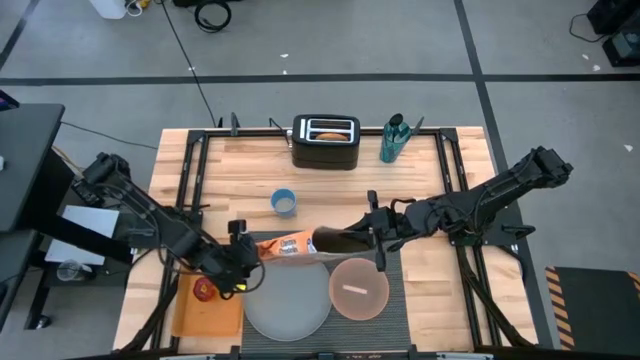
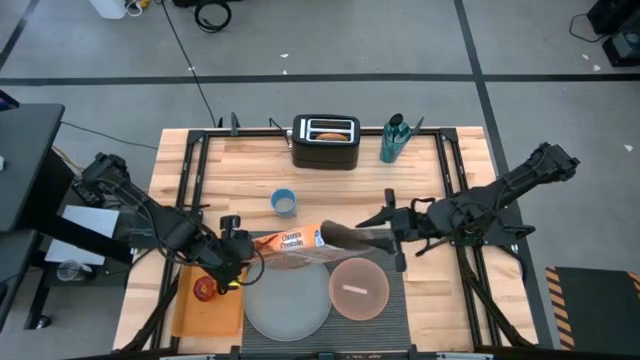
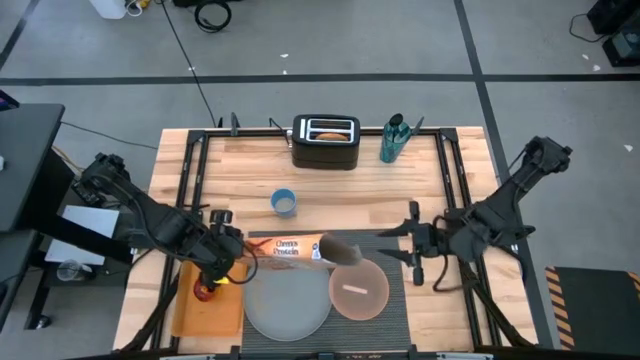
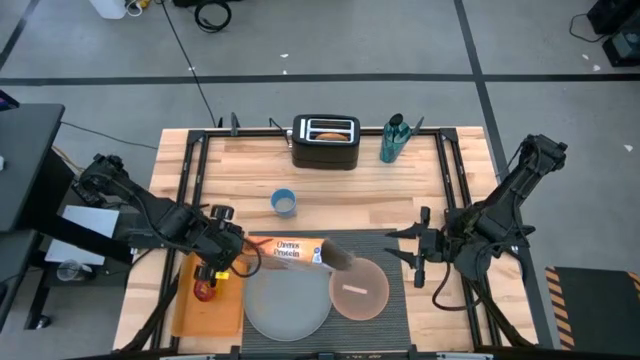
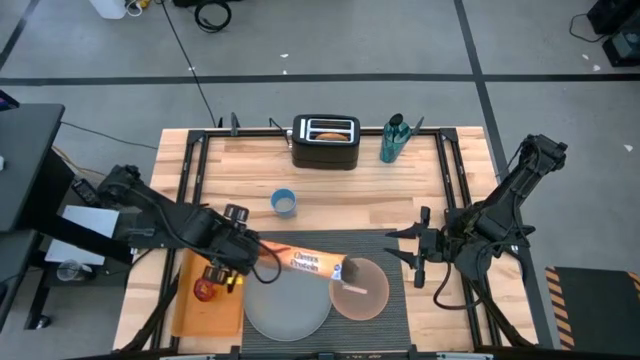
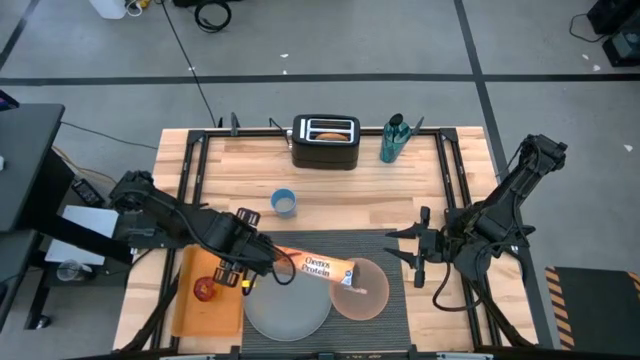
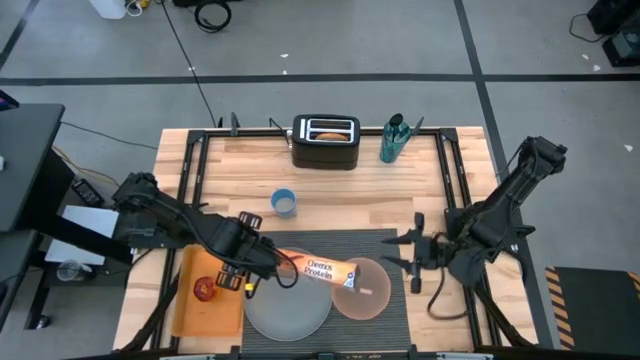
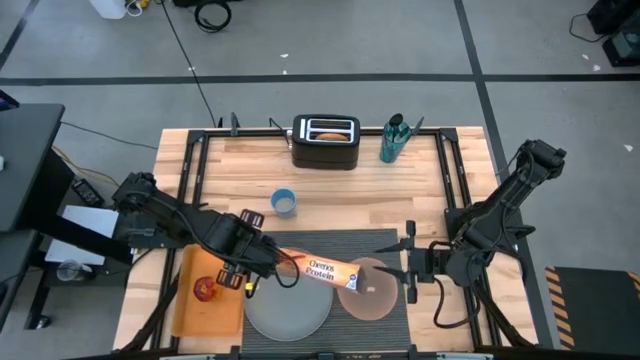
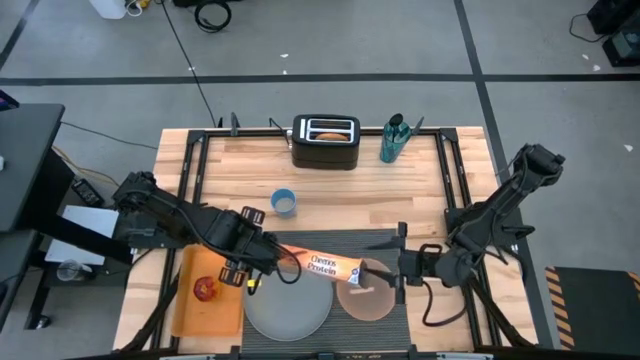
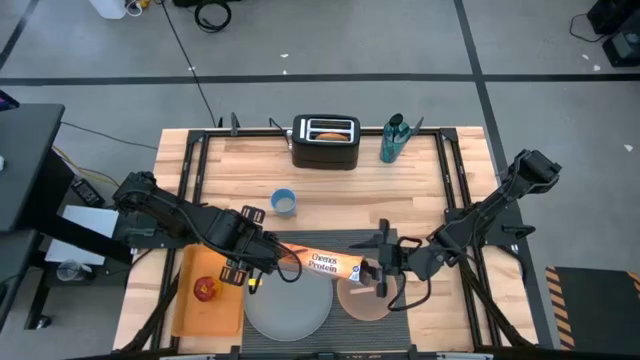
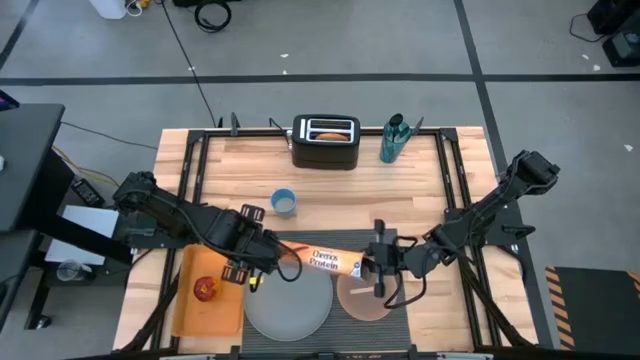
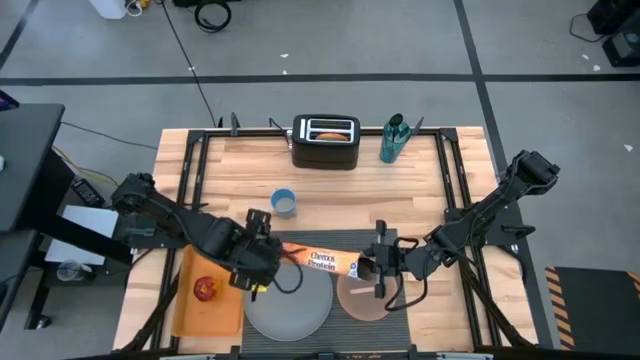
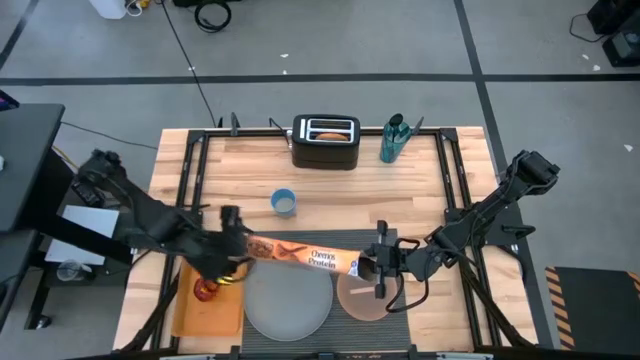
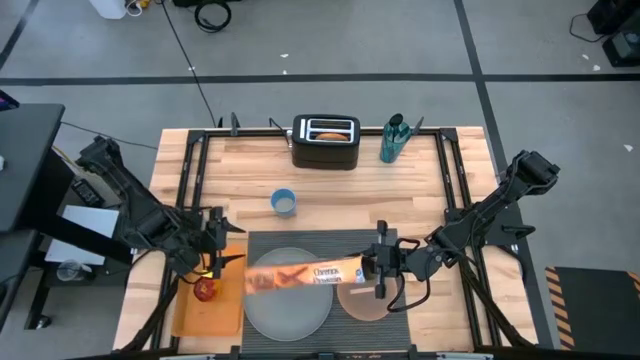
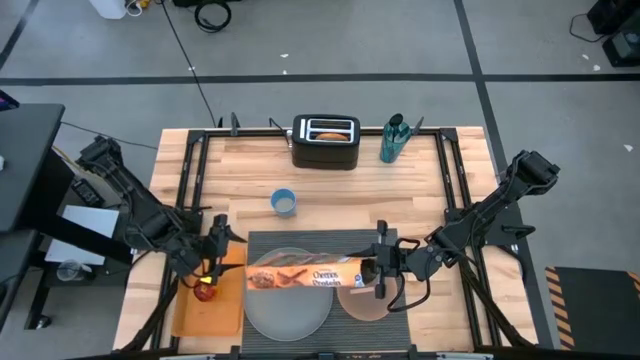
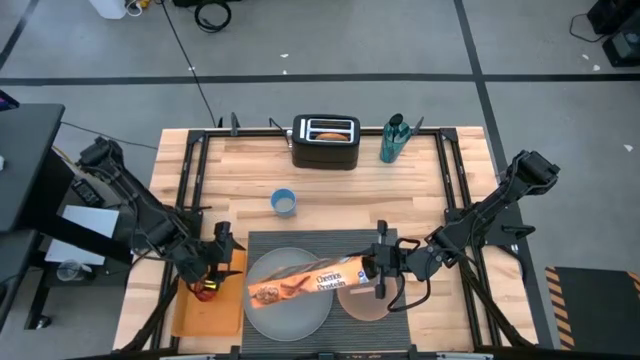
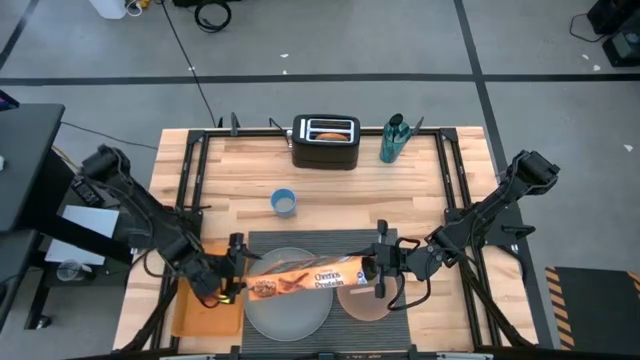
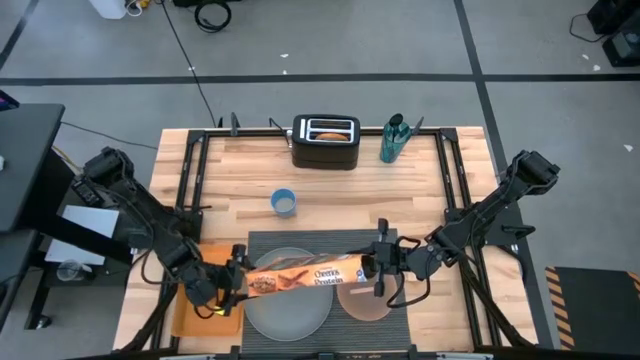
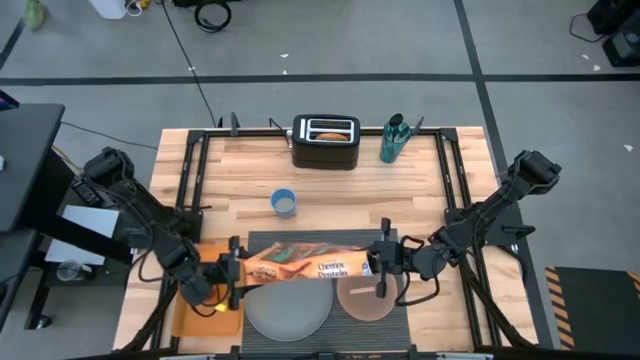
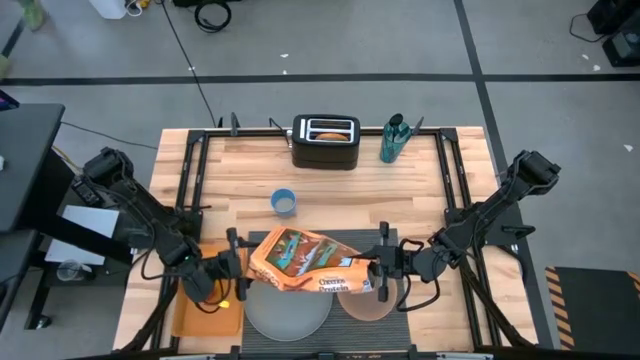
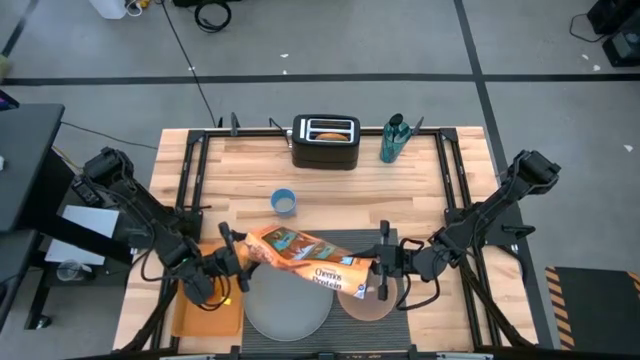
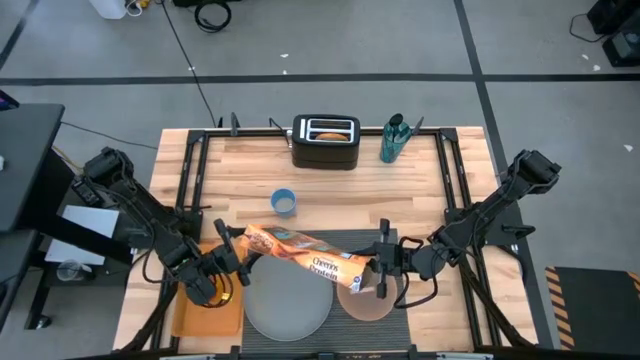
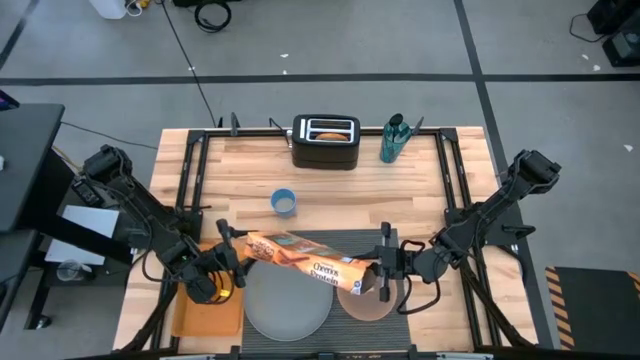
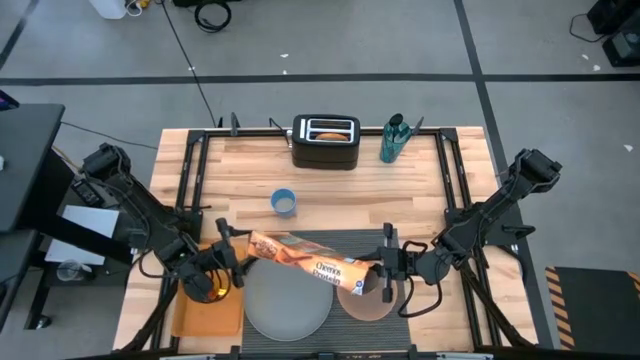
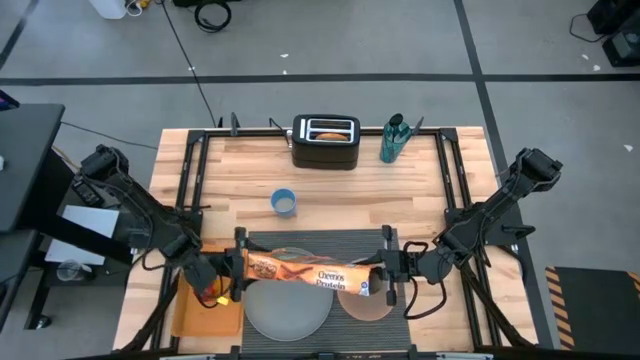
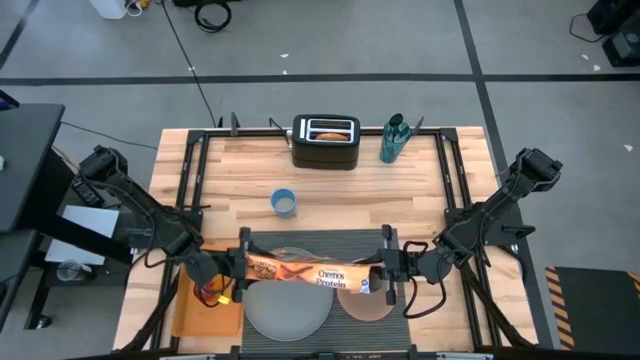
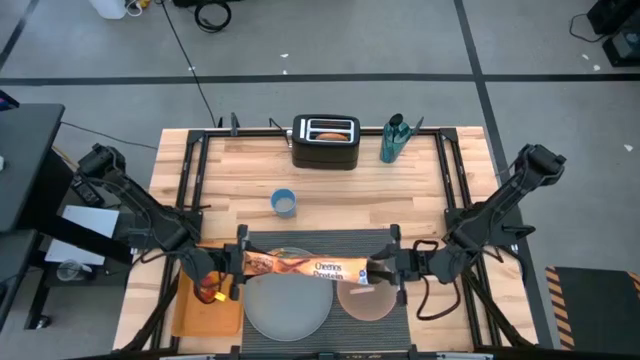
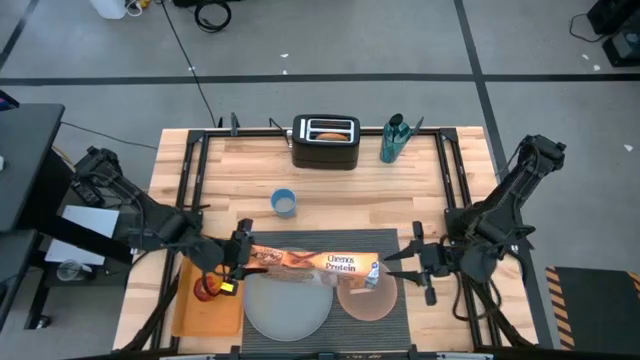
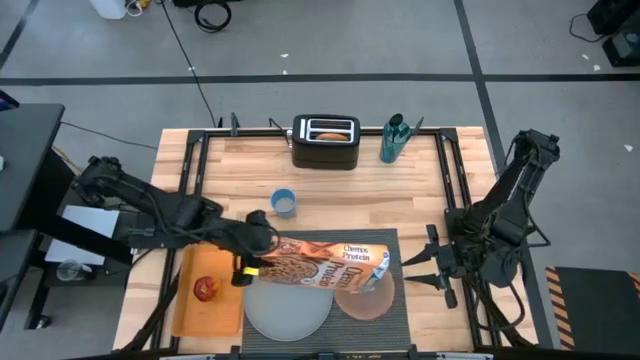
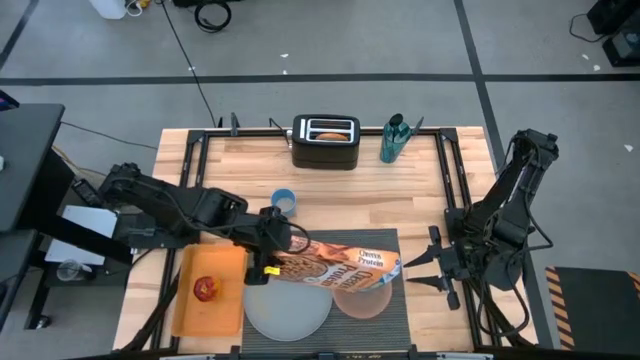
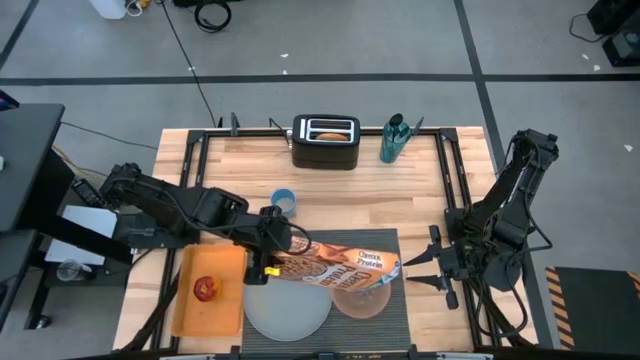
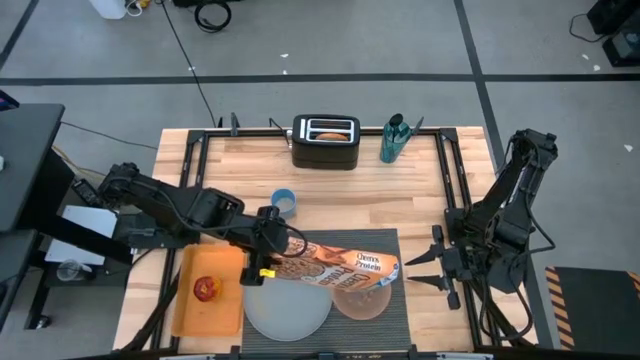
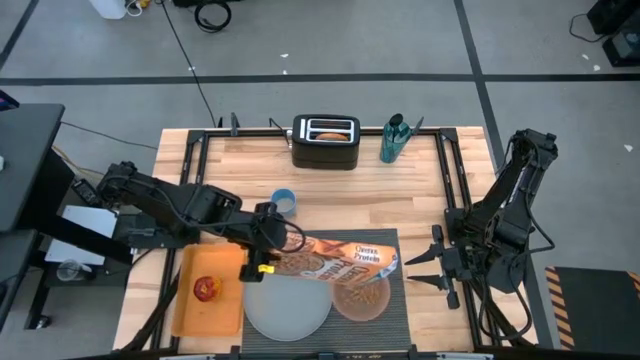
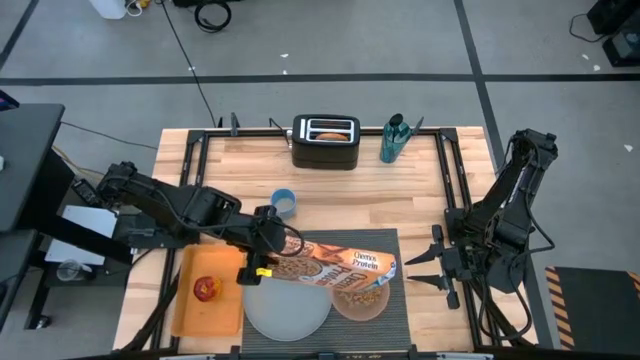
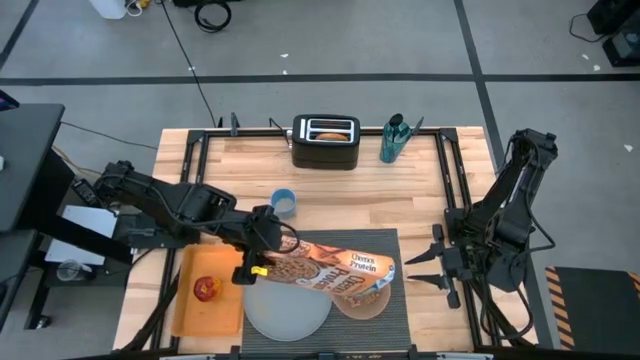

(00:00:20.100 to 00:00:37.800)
Task: Arrange a breakfast setting
Pour the cereal from the cereal box into the light orange bowl

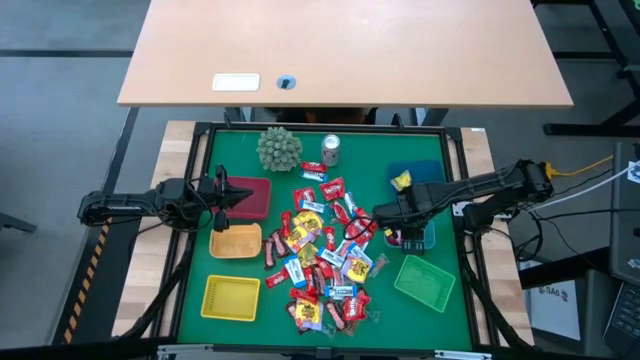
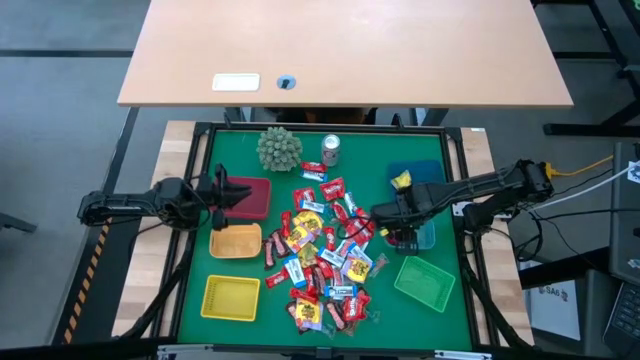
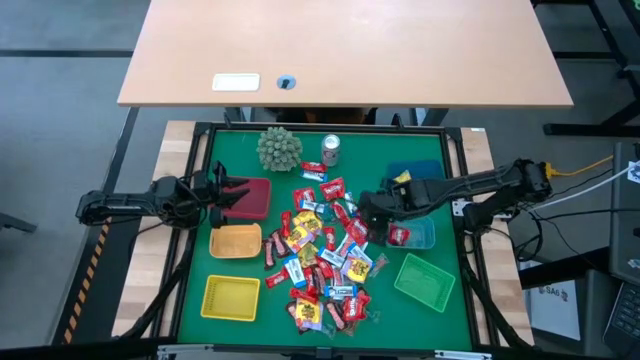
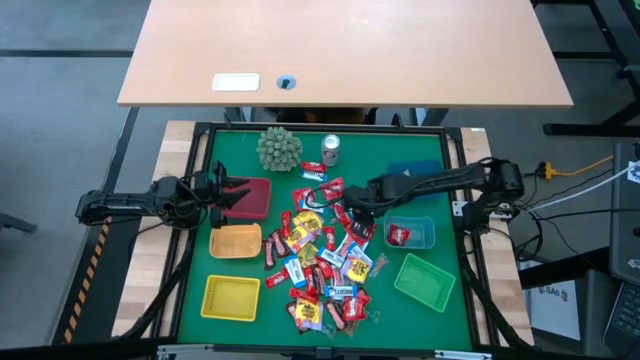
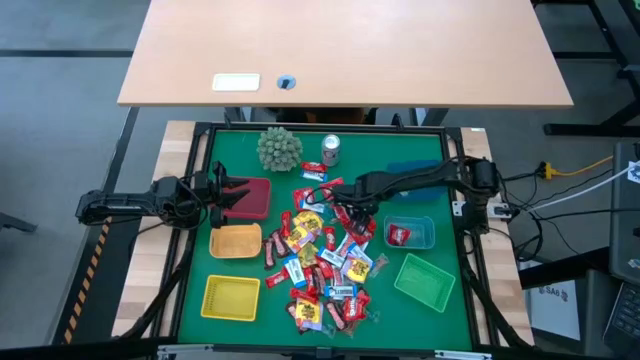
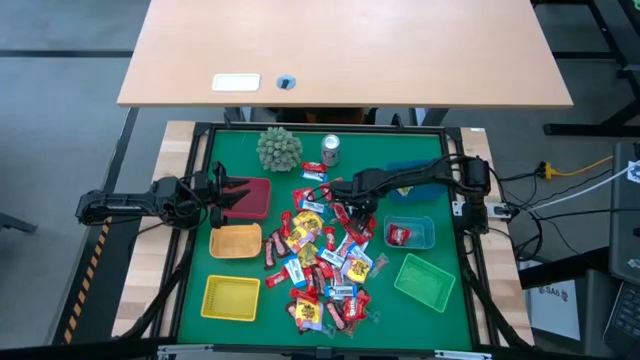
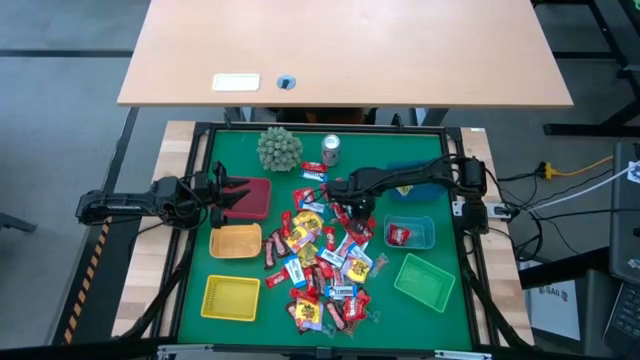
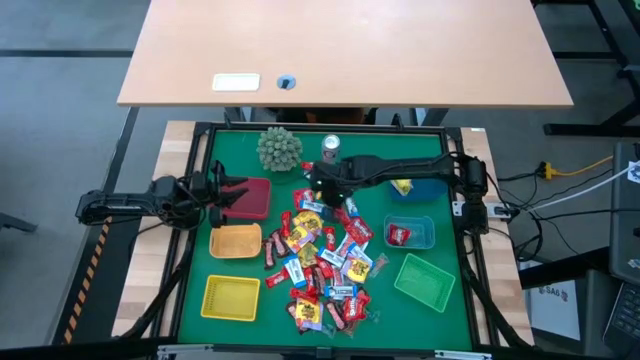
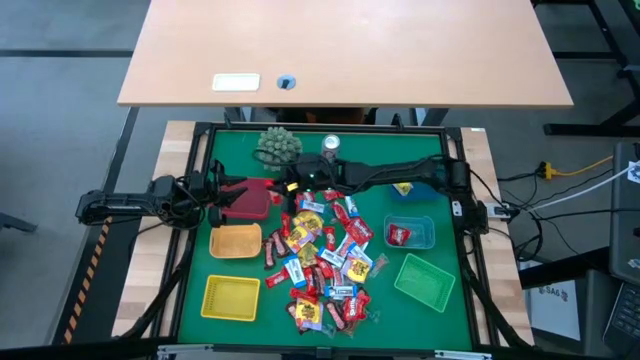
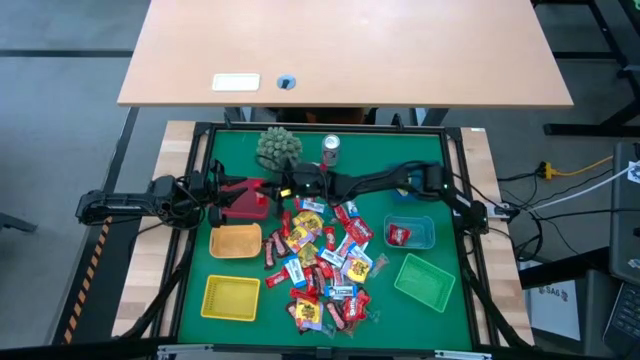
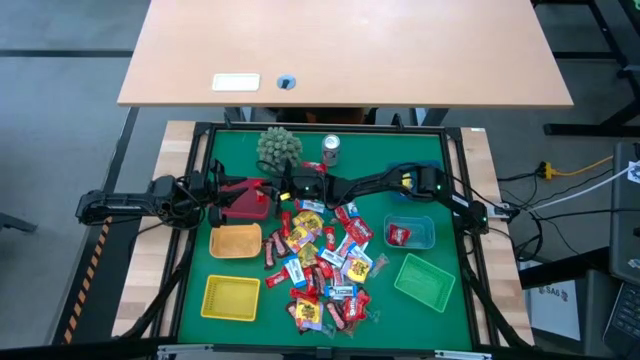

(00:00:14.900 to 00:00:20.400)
Task: Sort candy
Put the red chocolate bar into the red bin
